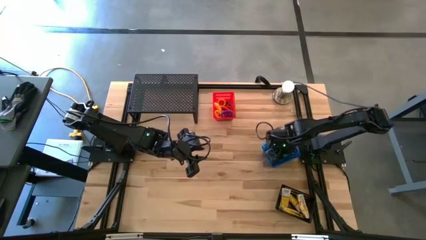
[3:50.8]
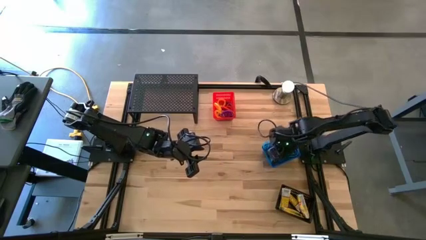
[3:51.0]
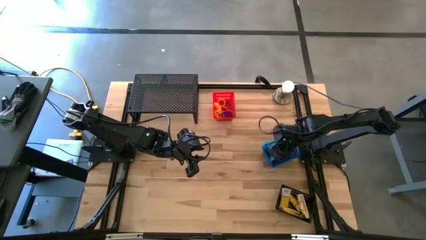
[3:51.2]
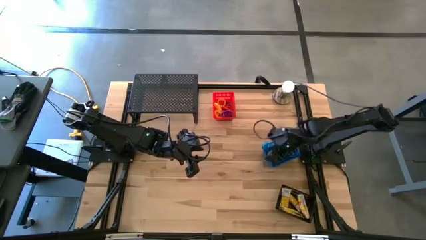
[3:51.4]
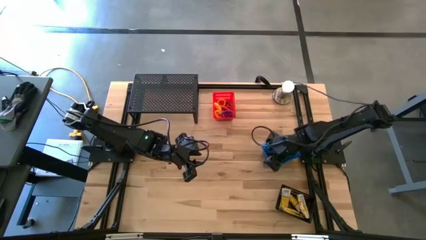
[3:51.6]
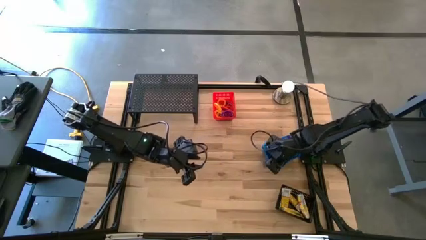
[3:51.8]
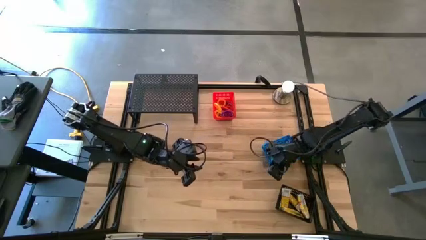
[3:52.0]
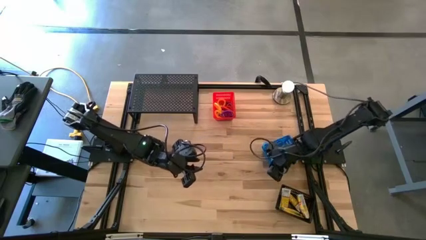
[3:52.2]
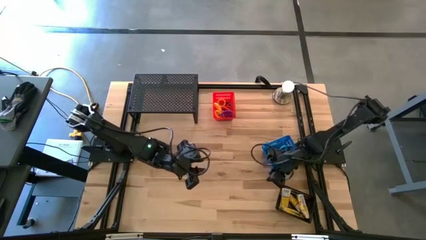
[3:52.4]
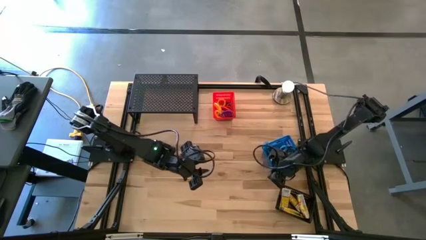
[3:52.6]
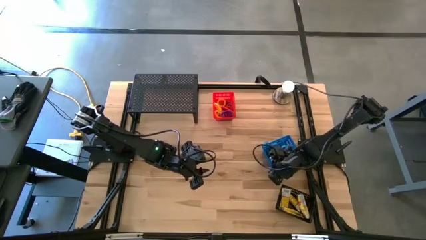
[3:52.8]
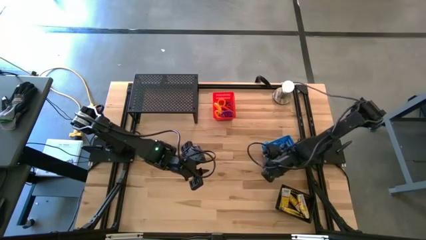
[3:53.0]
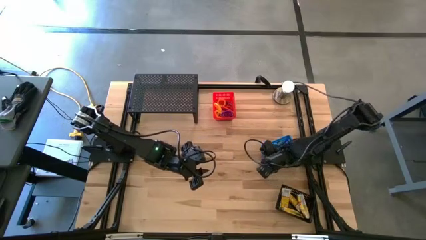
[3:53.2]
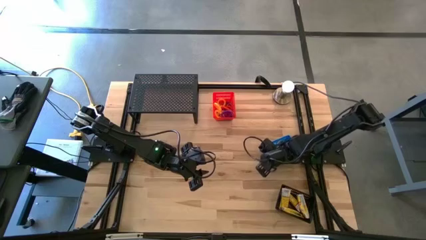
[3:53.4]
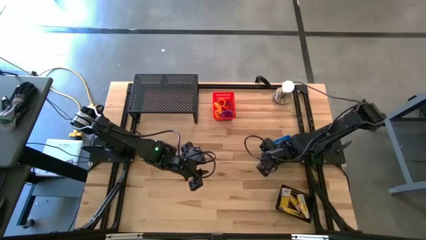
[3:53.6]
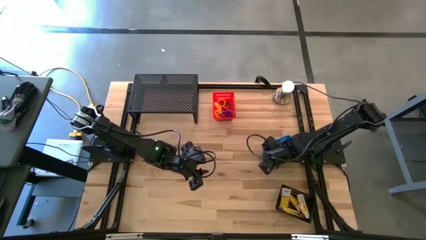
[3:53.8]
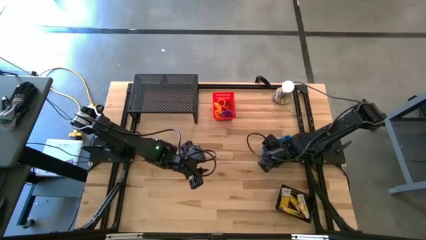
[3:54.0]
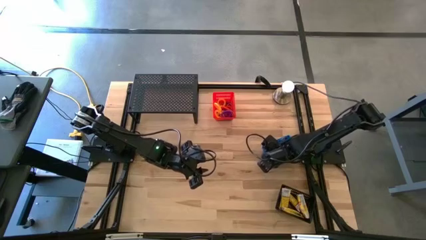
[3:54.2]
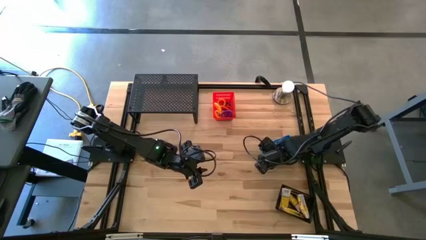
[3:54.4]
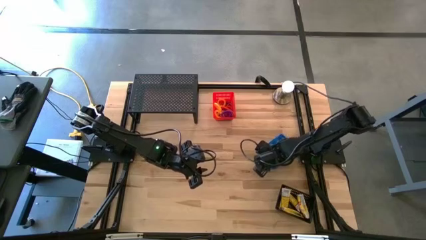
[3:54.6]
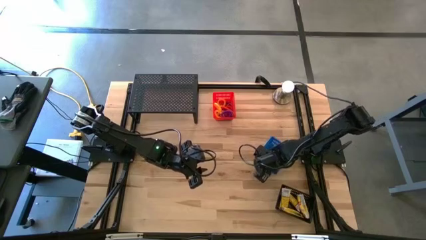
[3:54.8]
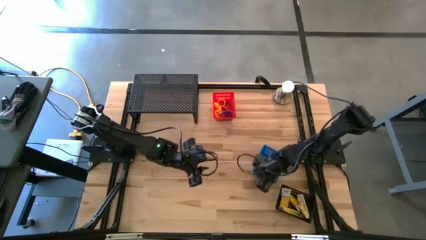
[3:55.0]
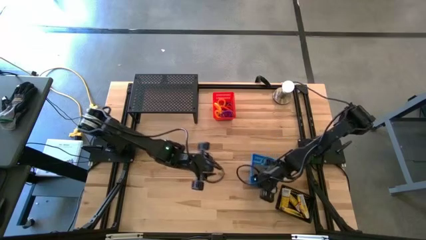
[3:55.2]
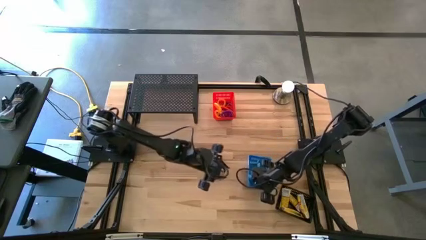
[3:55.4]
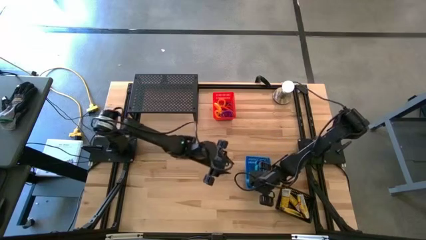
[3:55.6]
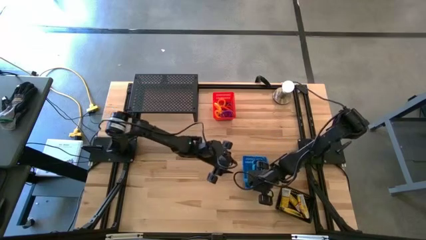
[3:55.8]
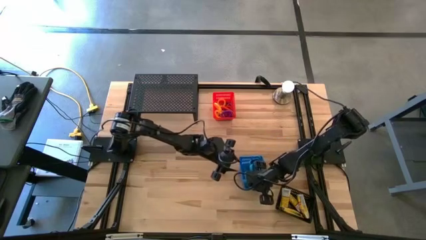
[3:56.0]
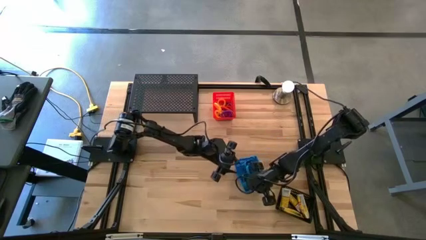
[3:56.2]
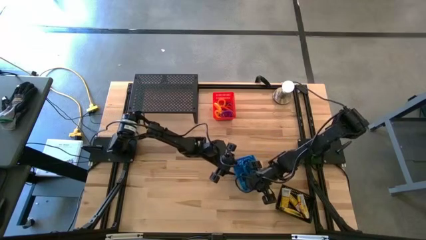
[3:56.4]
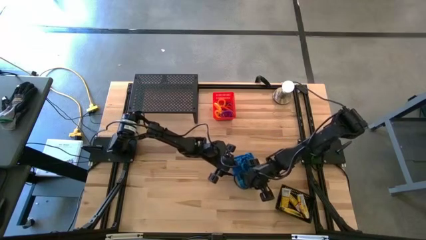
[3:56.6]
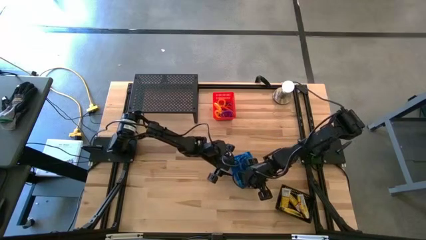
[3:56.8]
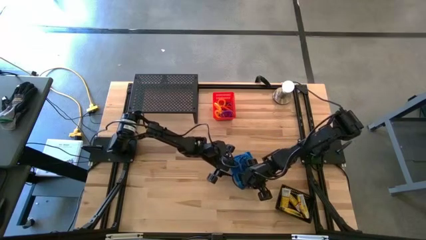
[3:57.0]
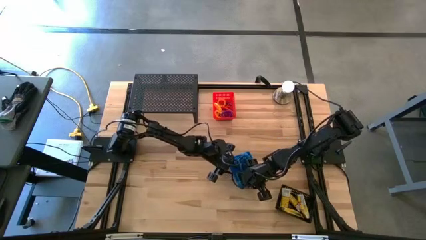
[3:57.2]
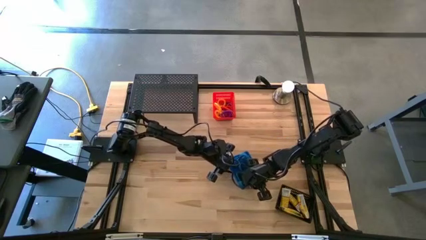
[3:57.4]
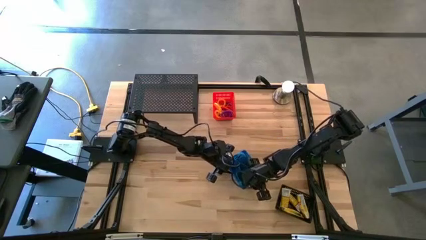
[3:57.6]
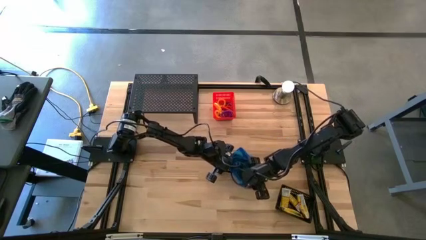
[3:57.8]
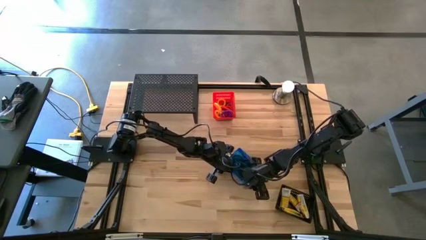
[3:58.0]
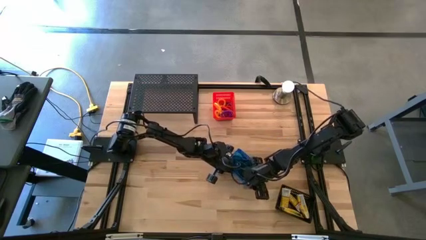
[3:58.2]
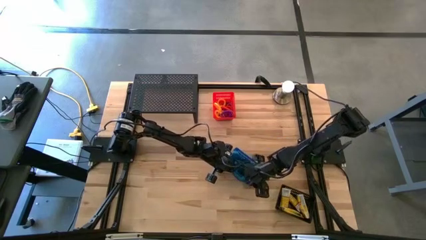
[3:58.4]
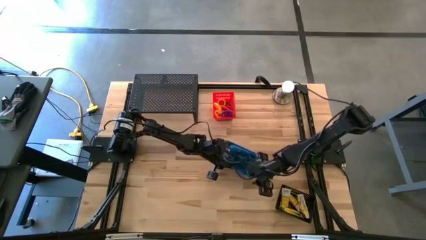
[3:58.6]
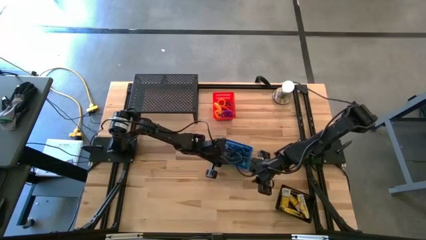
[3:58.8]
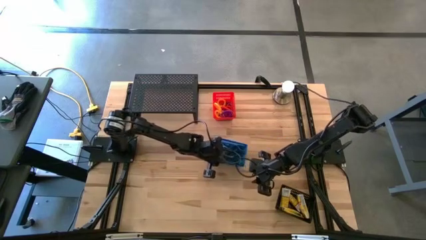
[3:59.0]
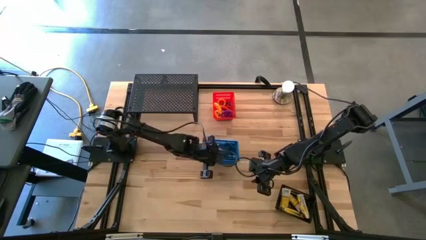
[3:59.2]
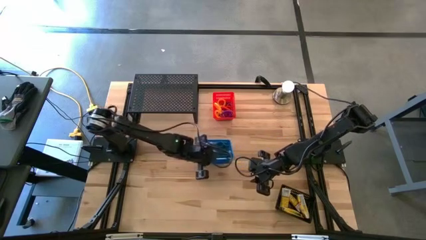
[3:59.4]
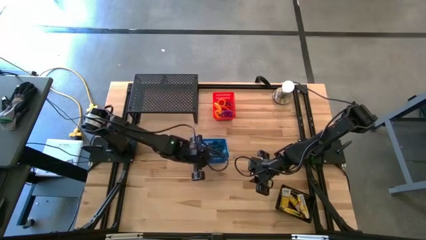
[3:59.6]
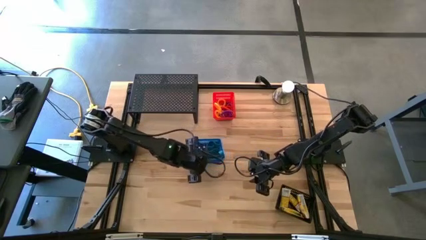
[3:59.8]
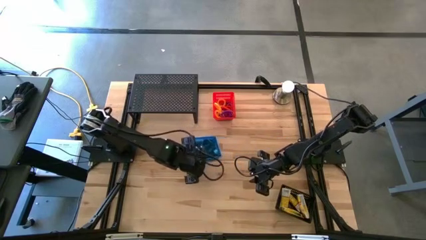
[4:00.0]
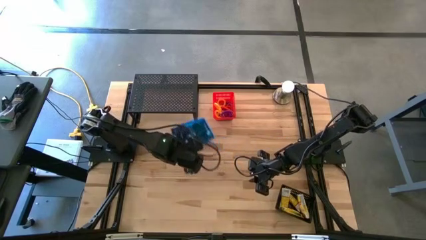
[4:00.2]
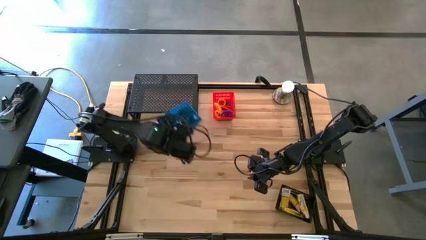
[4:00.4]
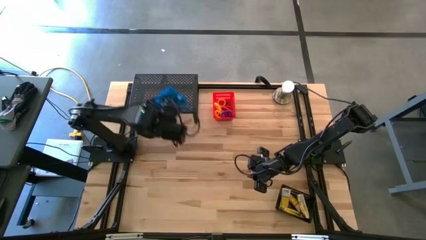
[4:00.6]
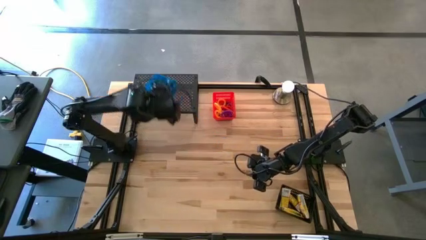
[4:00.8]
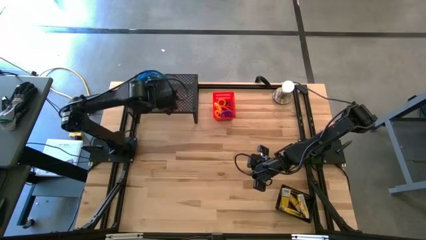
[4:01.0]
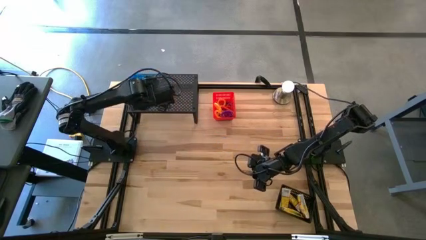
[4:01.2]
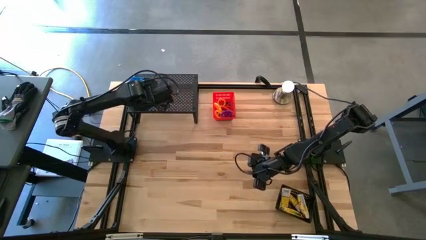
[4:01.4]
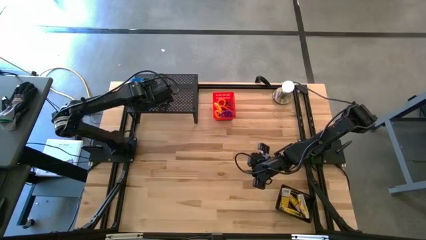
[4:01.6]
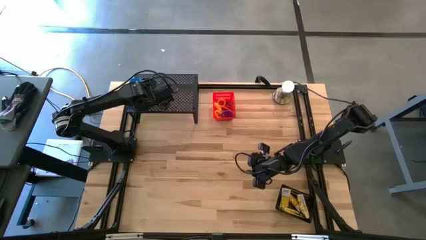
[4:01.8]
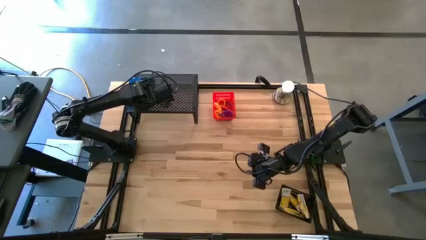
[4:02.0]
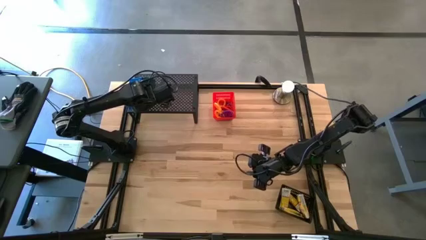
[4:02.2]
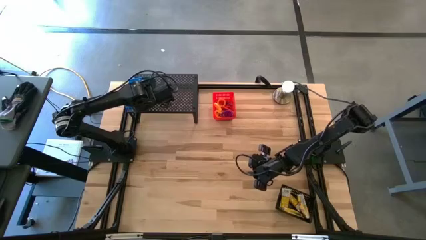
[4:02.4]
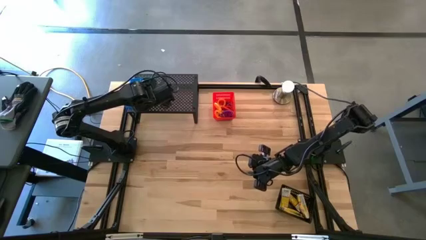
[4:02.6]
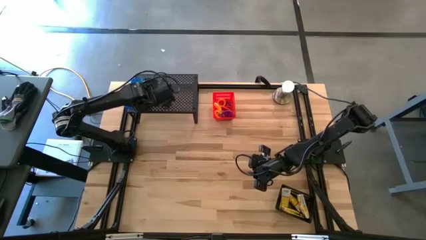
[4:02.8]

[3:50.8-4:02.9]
Task: Pick & Place Office Desk Supplies
Put the blue bin containing the rubber bands on the shelf

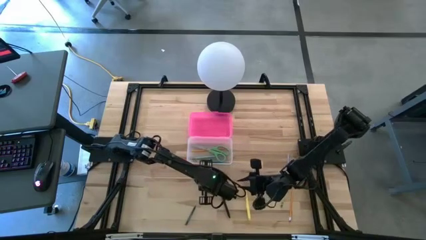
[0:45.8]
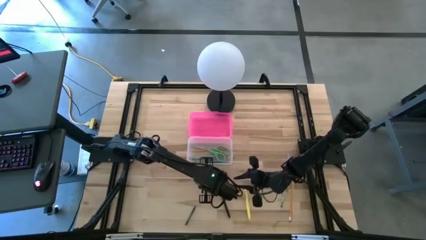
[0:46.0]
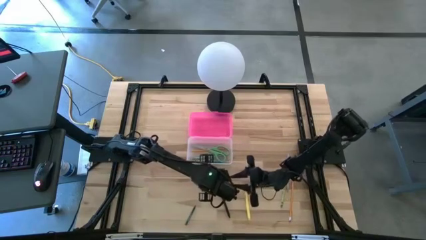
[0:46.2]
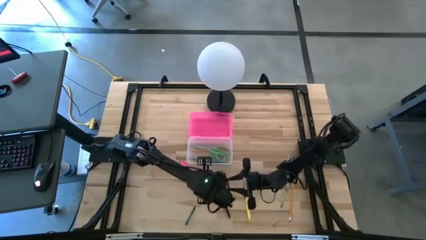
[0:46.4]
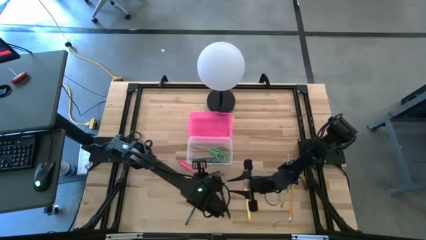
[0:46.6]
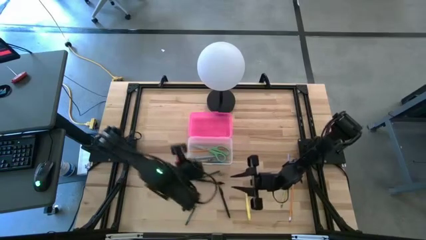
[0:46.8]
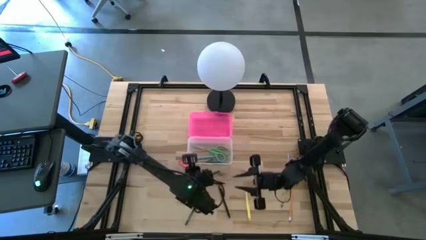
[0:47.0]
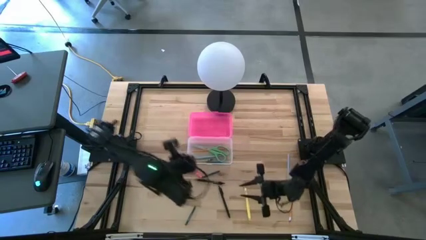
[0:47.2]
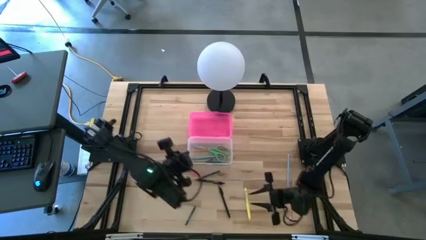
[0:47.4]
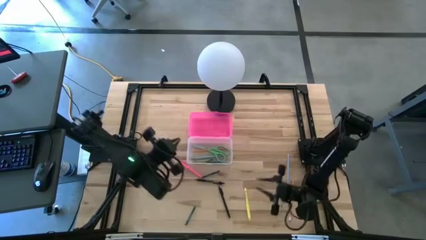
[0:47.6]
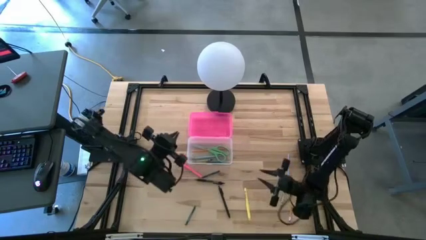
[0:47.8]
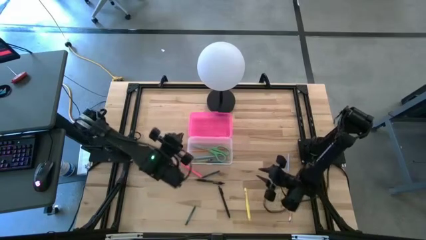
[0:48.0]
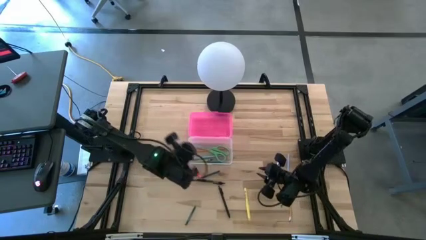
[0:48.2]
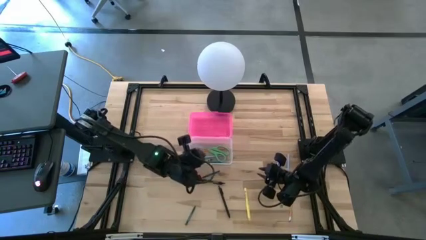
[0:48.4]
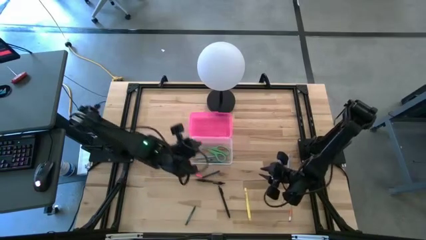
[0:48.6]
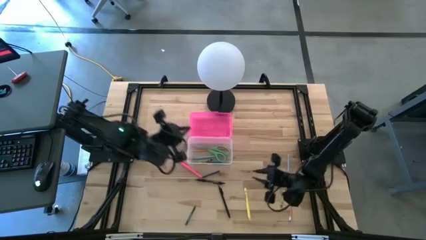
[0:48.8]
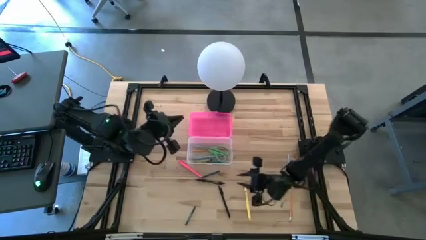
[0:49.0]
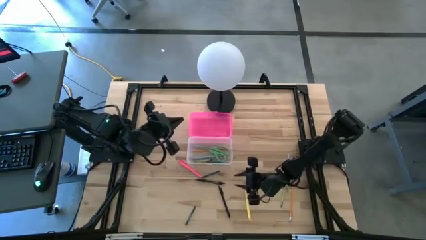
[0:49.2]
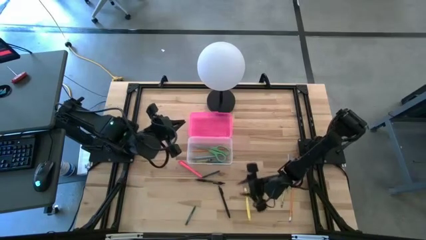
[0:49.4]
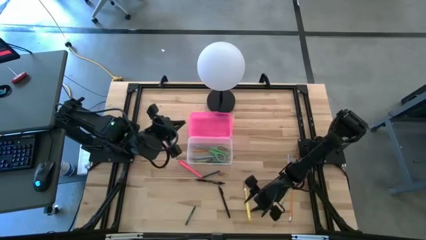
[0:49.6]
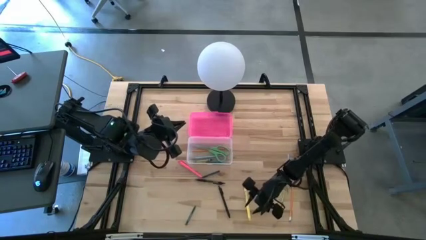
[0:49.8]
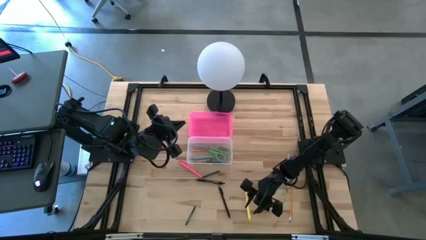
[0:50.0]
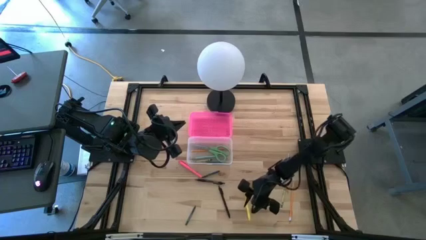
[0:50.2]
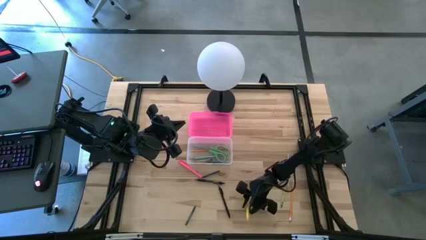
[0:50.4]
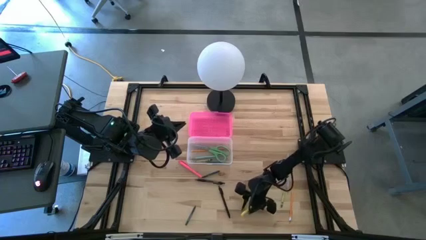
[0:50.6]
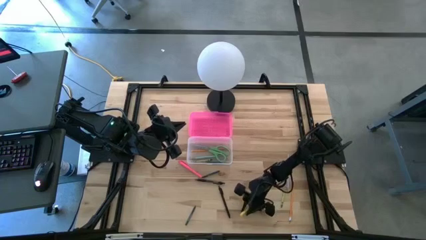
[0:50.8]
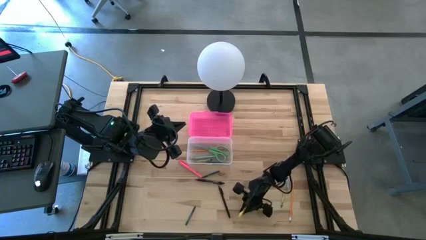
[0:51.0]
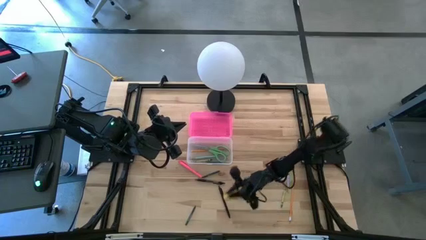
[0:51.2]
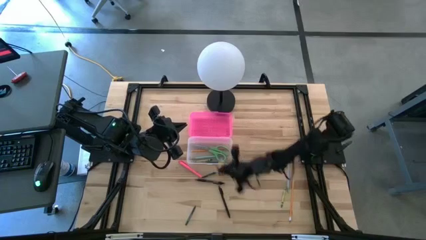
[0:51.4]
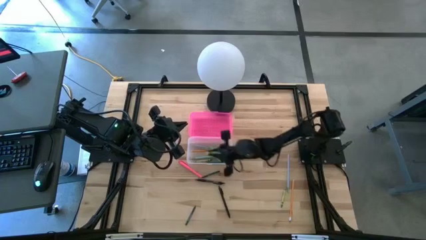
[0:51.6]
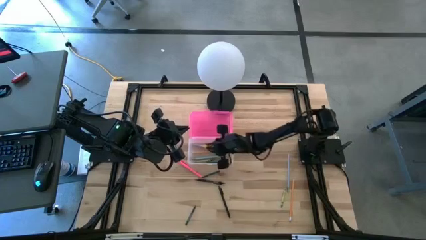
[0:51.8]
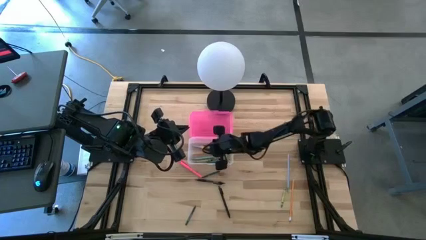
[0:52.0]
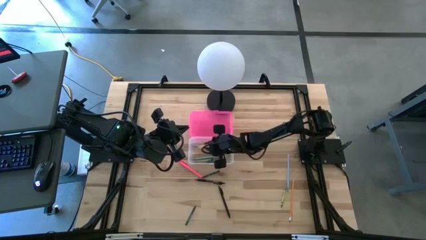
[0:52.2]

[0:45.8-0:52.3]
Task: Pick & place school supplies into a supply box
Put the yellow pen into the pink supply box
